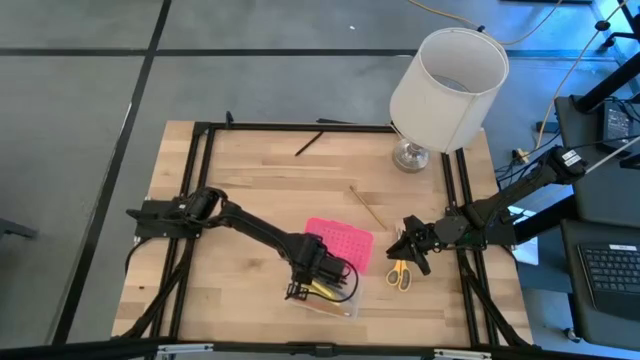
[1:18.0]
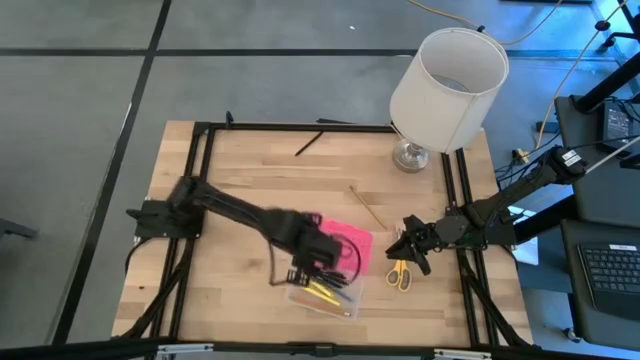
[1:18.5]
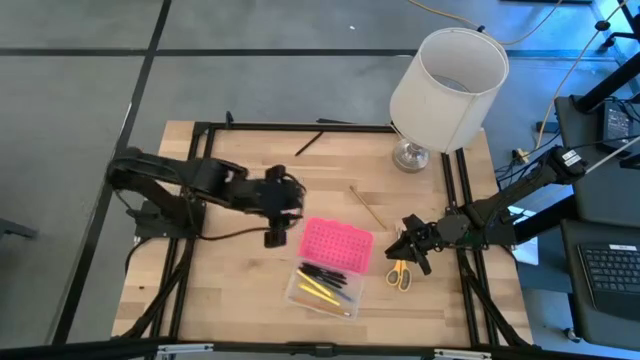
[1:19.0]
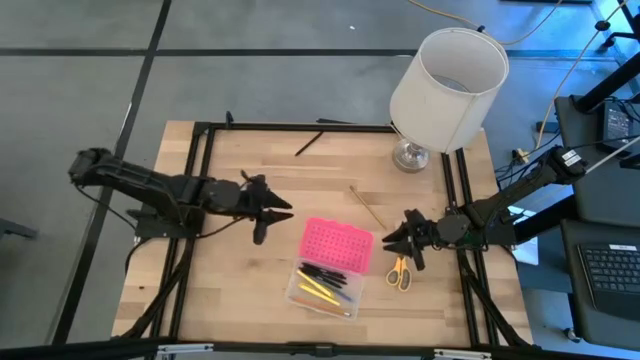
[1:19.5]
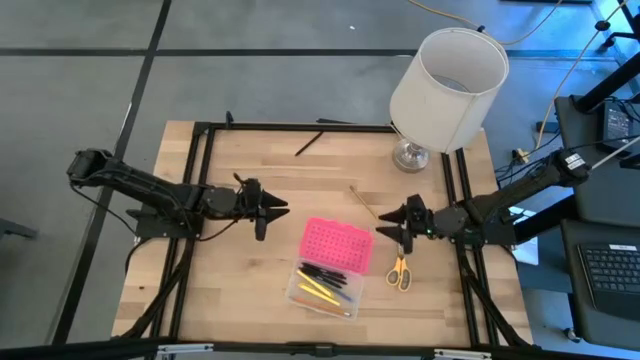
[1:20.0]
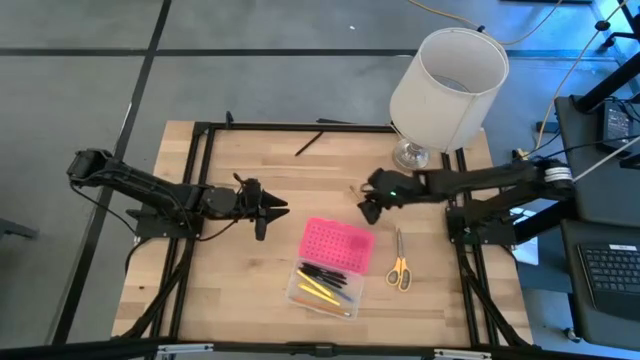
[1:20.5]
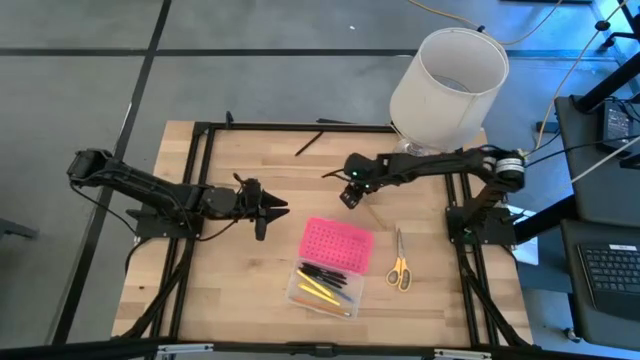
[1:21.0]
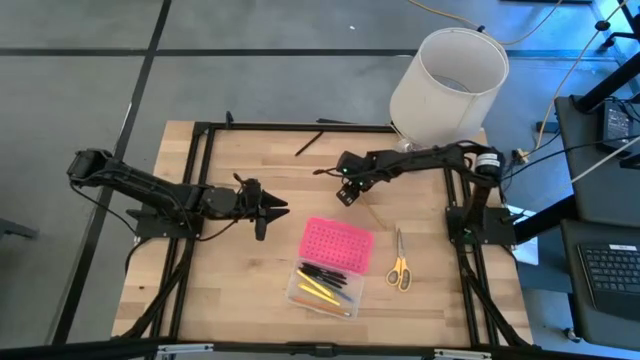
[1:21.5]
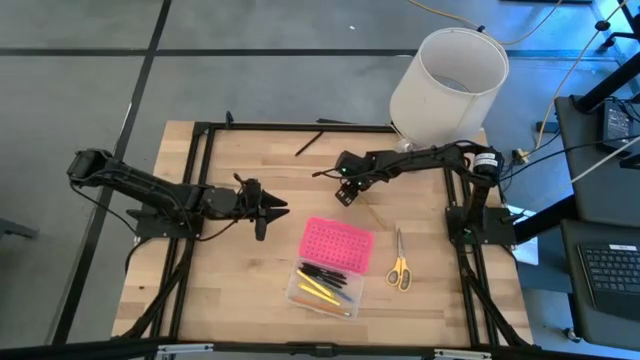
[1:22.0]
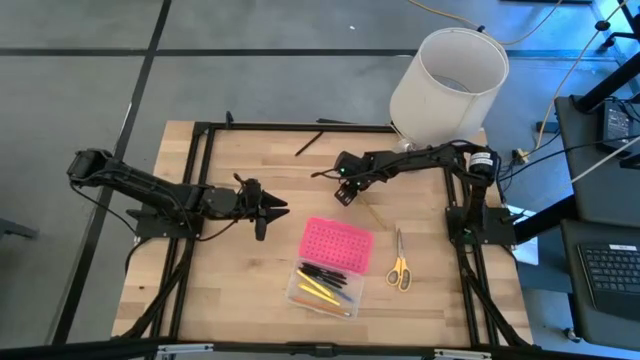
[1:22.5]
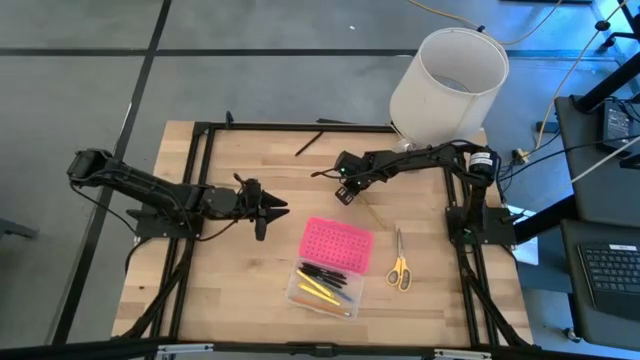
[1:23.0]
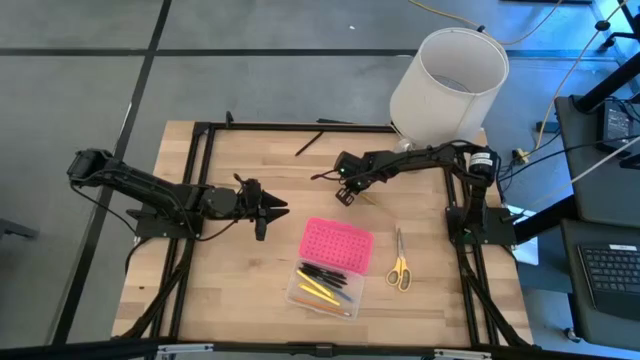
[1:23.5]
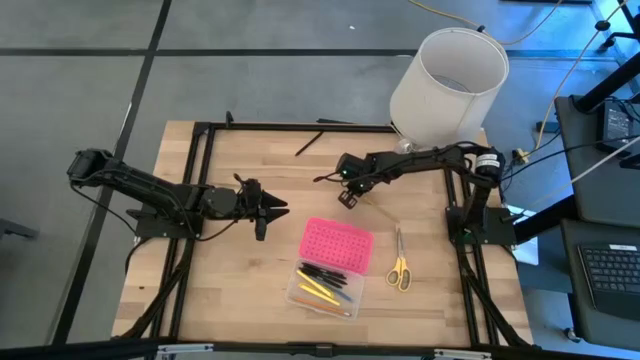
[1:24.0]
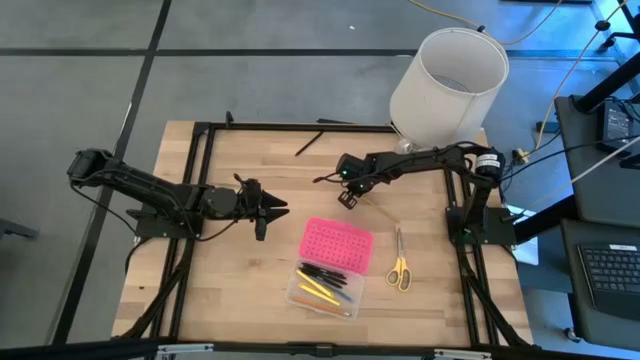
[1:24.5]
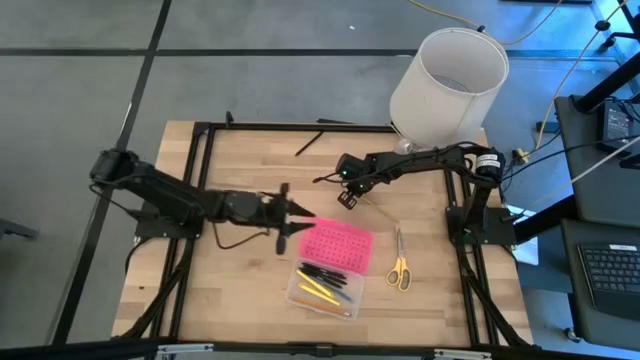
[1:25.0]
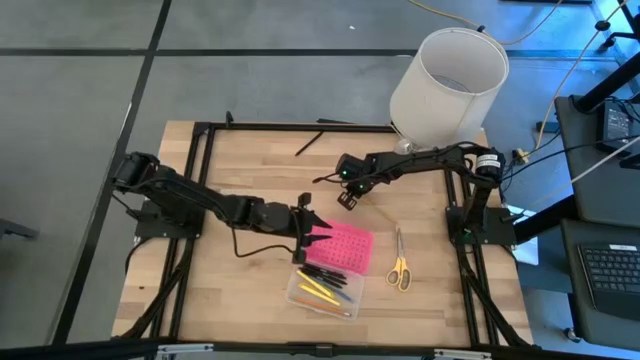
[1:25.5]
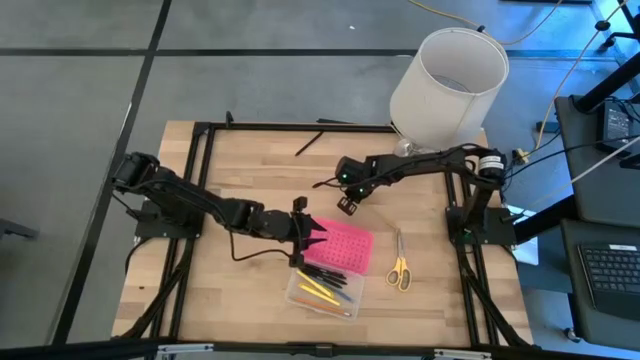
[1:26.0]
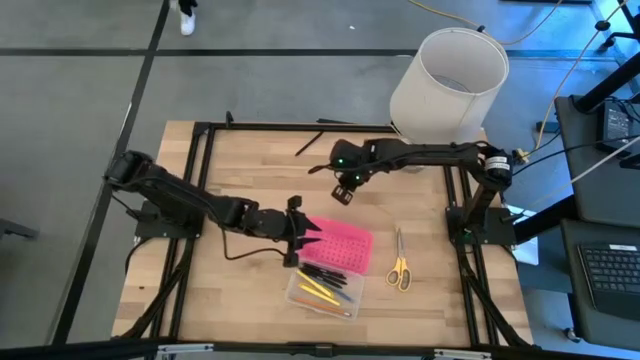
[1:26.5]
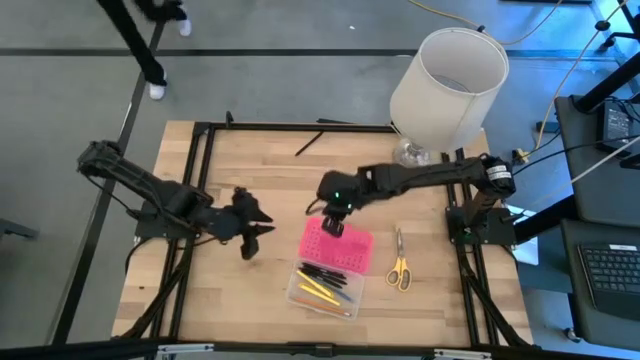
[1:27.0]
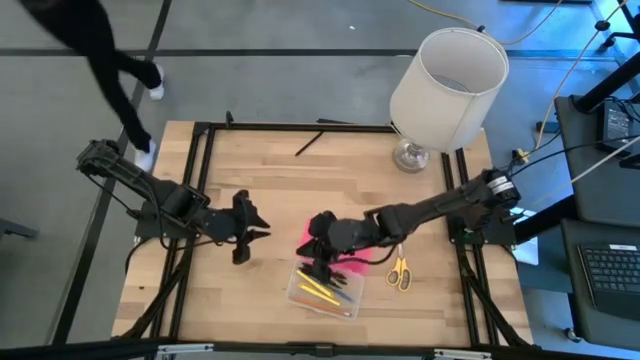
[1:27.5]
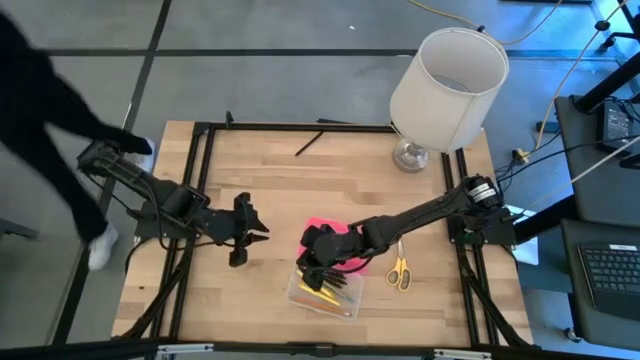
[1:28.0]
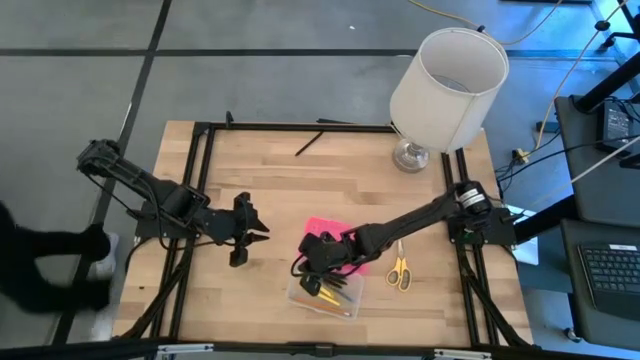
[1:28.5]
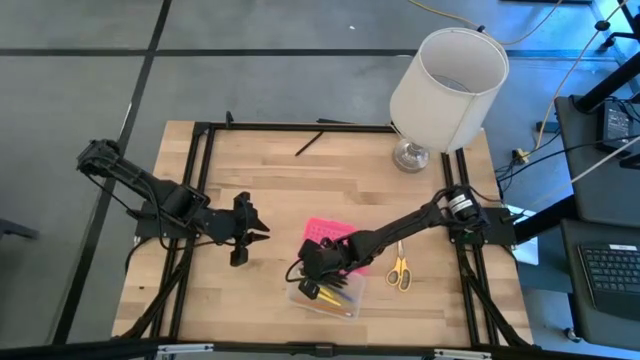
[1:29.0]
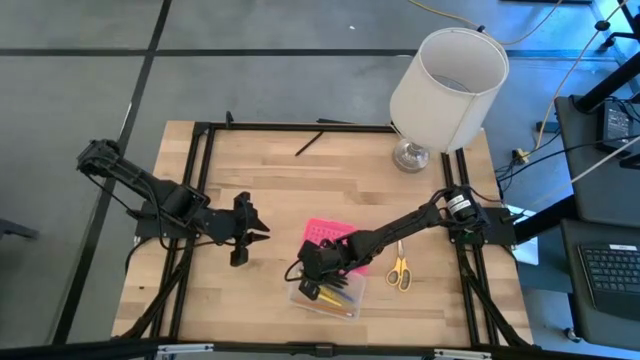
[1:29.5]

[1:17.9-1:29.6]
Task: Pick & place school supplies into a supply box
Put the yellow pencil into the pink supply box

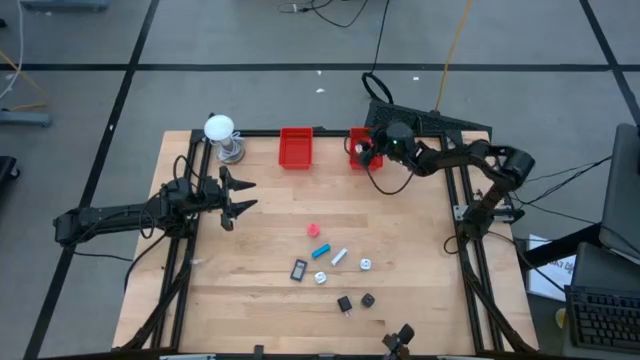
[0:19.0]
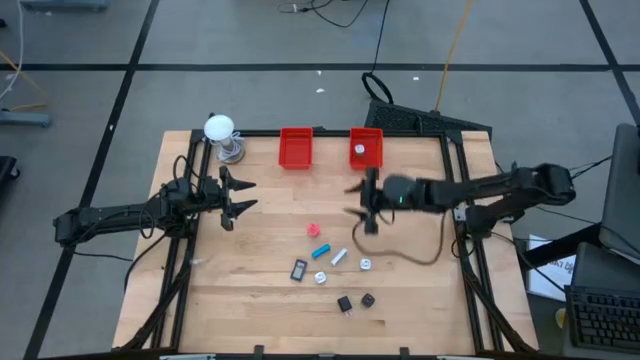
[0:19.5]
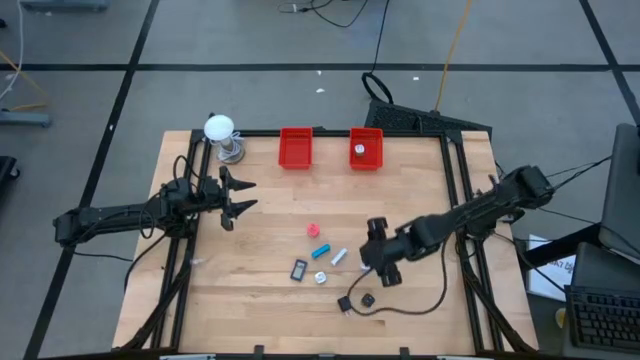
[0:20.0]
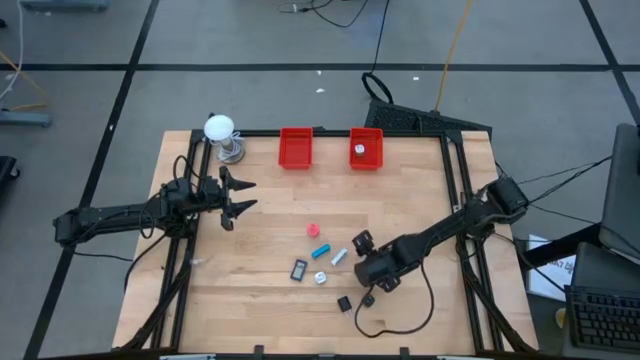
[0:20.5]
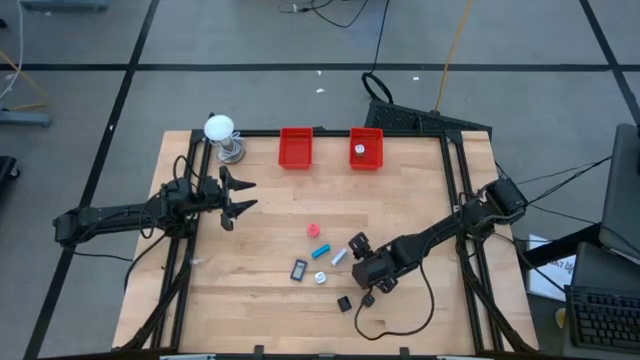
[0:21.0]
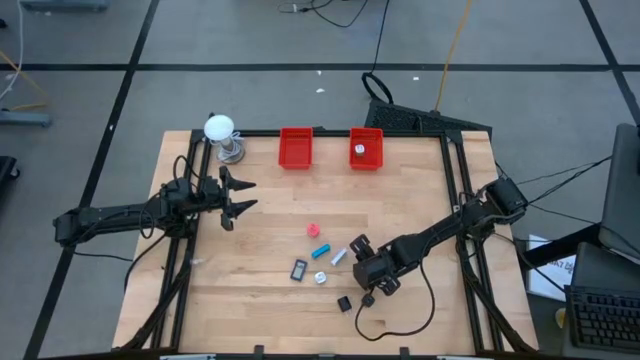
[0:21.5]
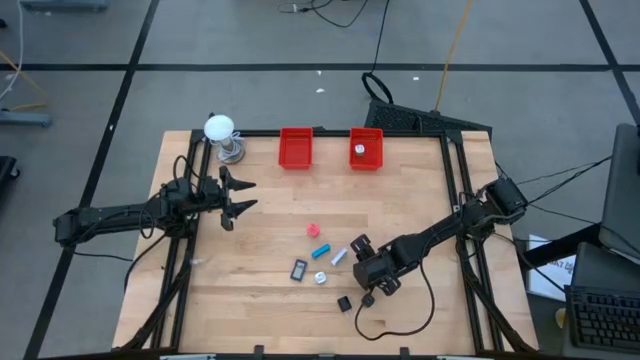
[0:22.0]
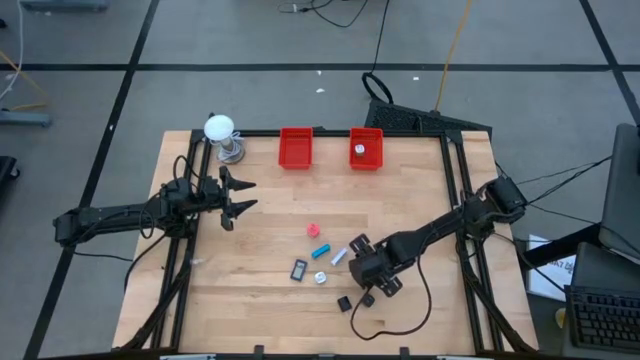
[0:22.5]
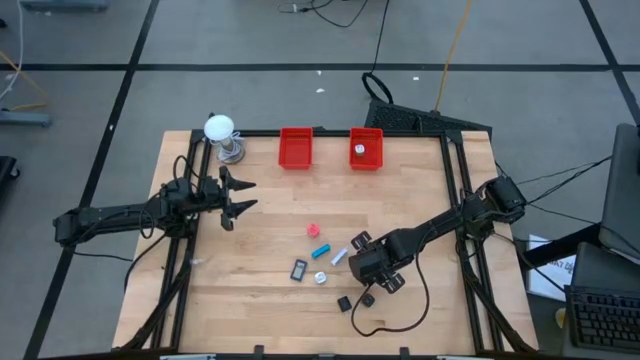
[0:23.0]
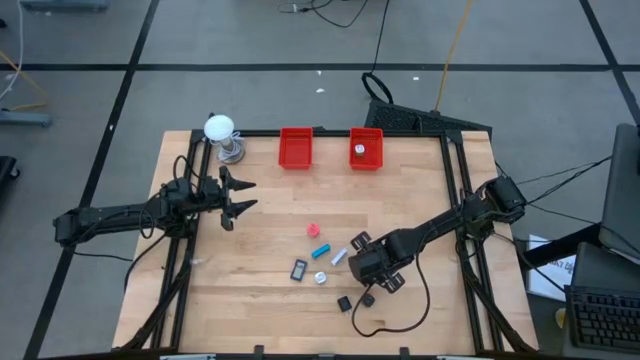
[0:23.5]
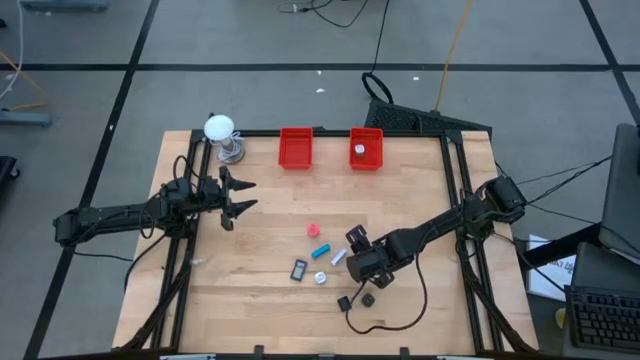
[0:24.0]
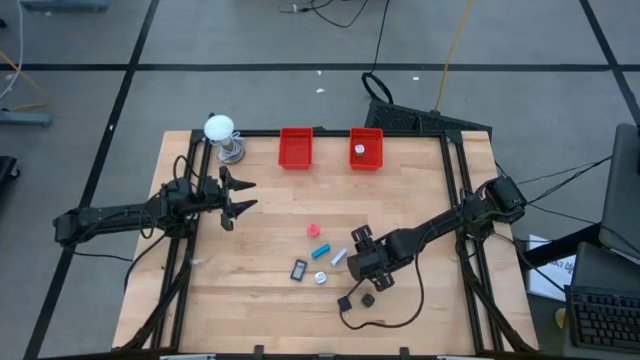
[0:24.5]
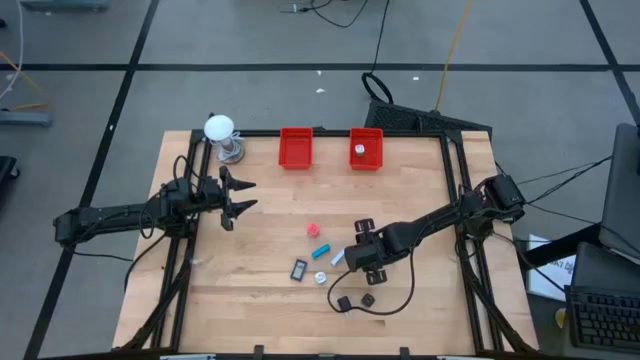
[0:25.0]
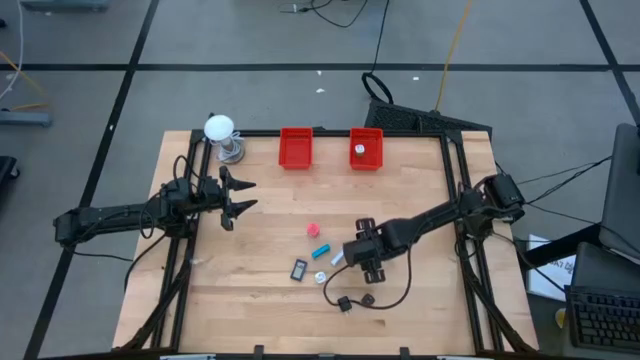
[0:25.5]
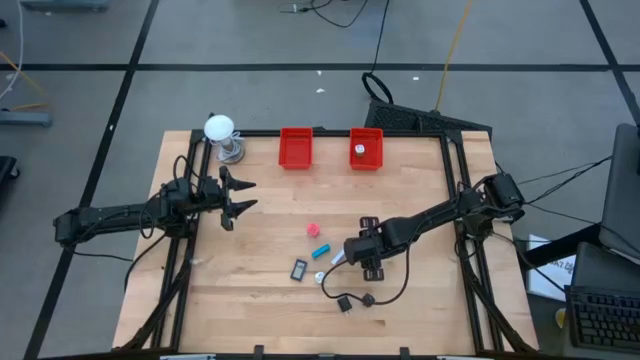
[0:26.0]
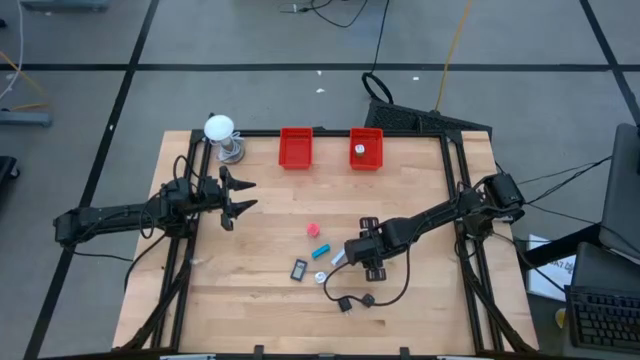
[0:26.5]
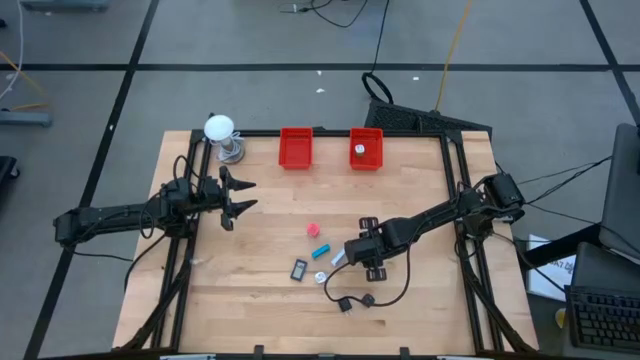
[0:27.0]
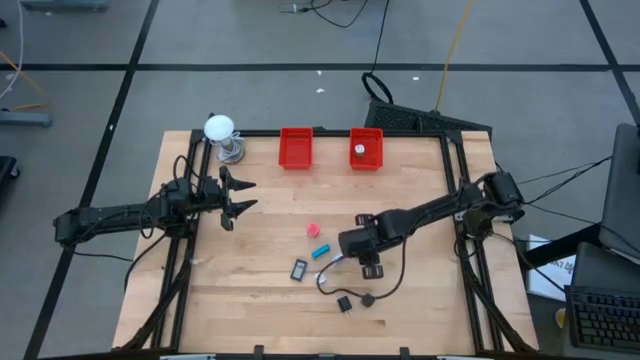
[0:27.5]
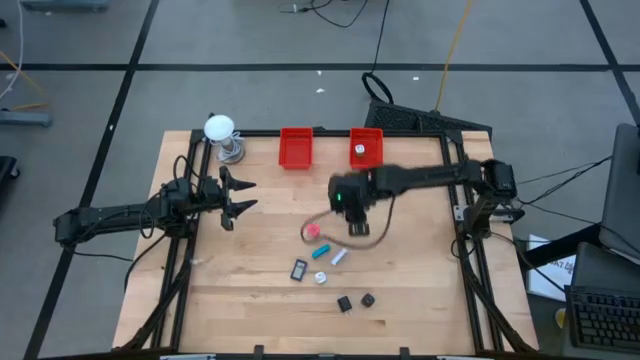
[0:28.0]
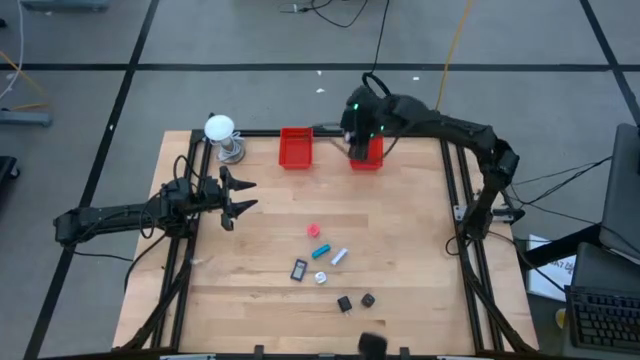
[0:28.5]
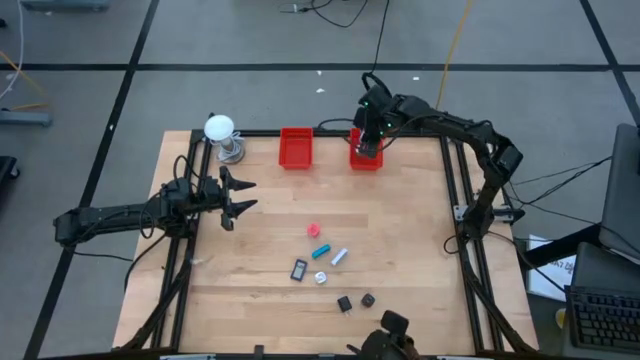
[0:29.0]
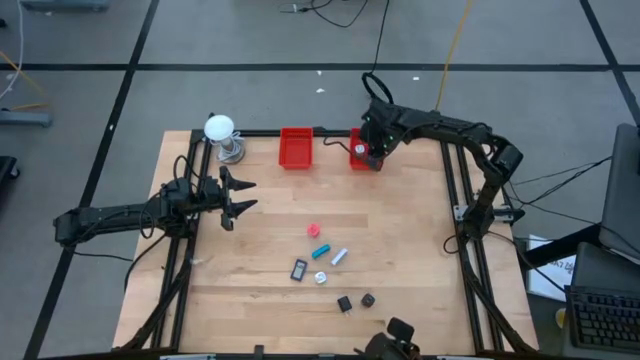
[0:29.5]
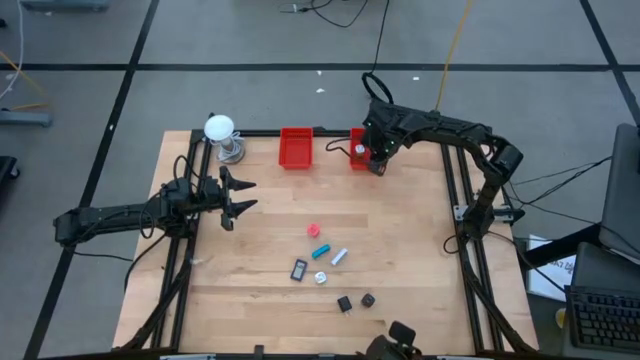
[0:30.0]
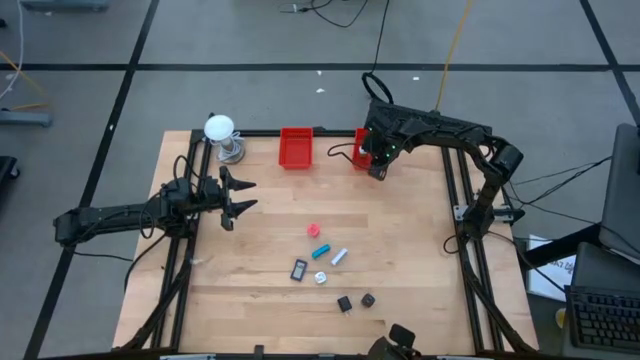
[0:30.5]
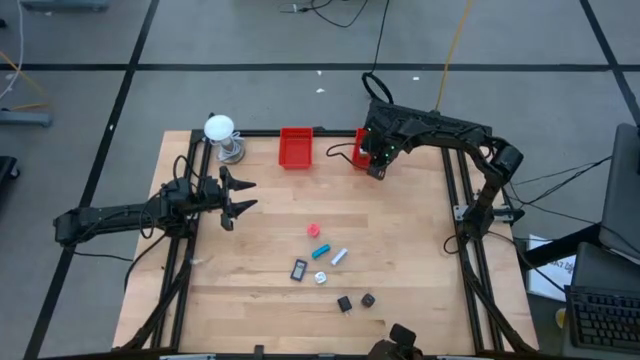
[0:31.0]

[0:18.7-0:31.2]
Task: Pick & Place Office items
Put the blue charger adapter into the right red basket
